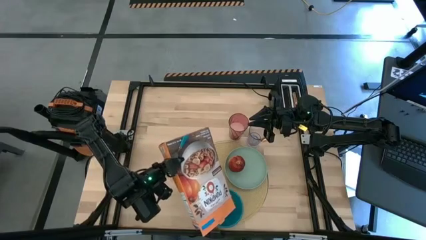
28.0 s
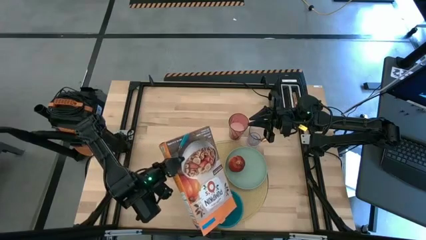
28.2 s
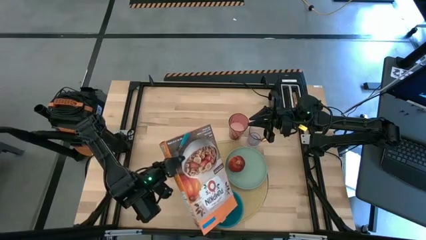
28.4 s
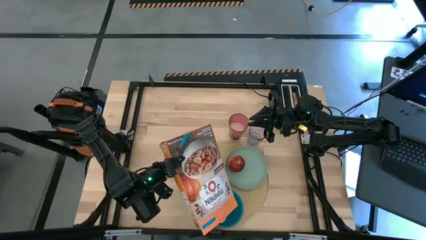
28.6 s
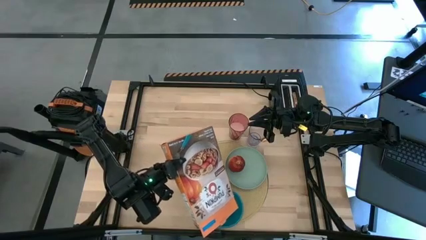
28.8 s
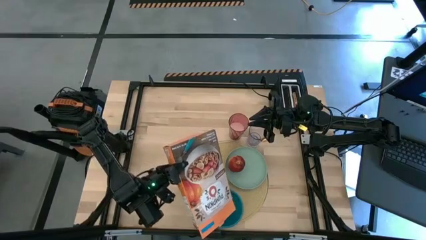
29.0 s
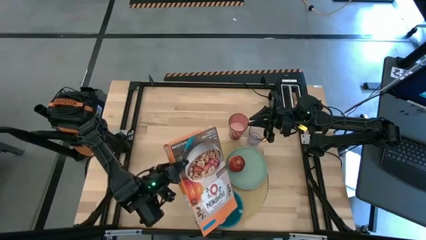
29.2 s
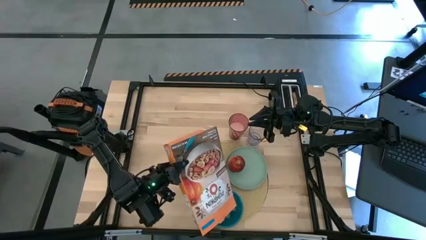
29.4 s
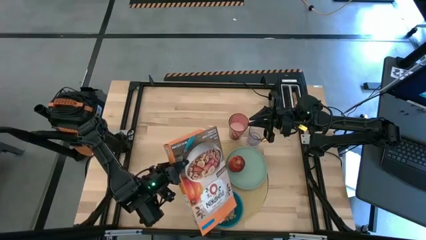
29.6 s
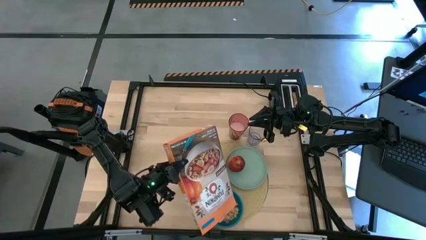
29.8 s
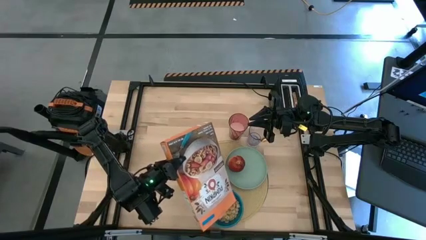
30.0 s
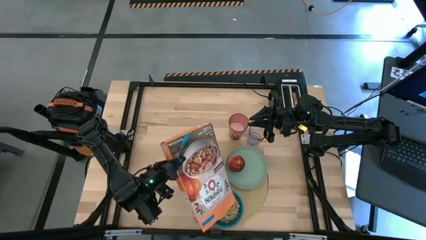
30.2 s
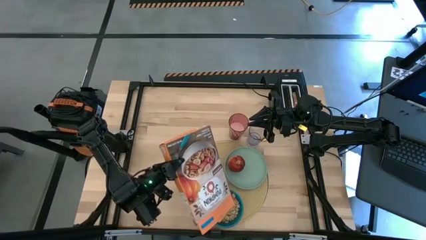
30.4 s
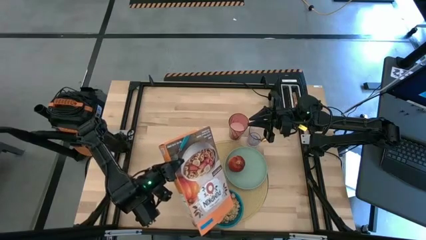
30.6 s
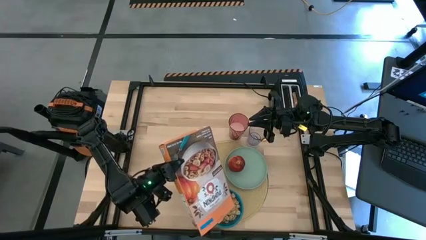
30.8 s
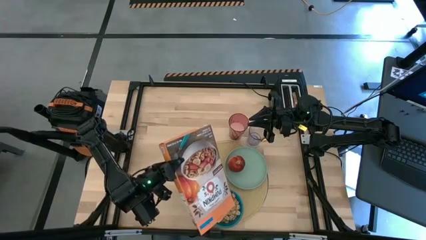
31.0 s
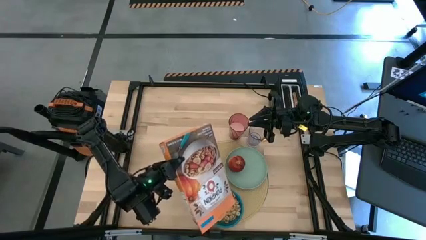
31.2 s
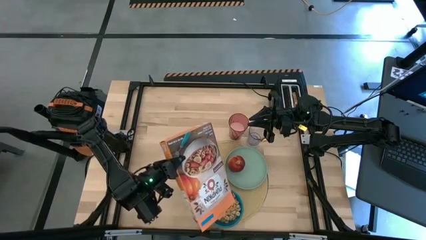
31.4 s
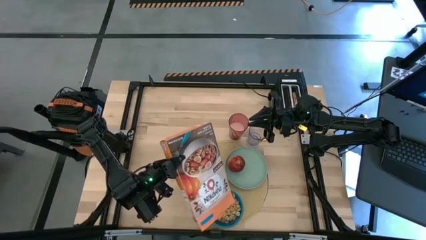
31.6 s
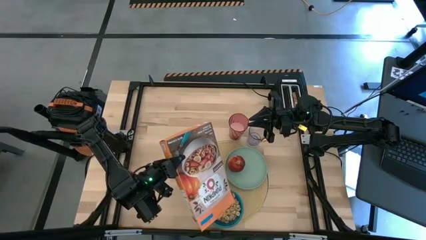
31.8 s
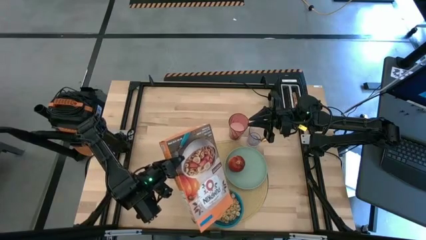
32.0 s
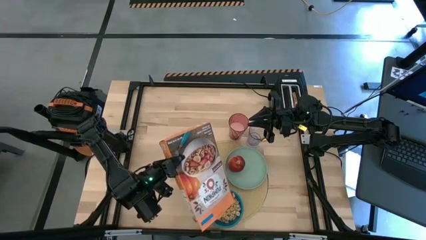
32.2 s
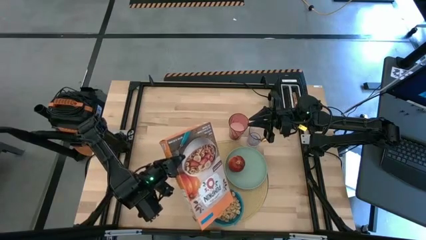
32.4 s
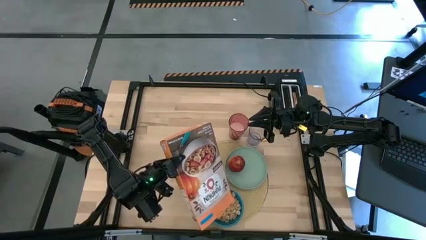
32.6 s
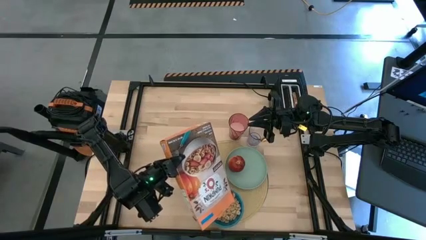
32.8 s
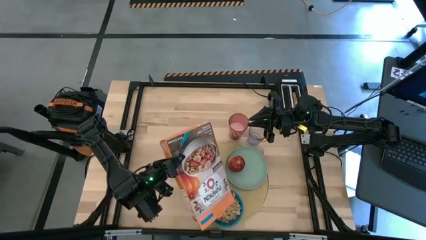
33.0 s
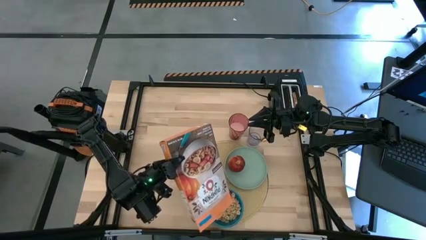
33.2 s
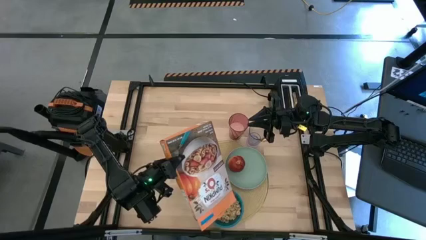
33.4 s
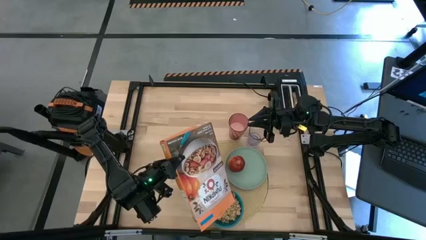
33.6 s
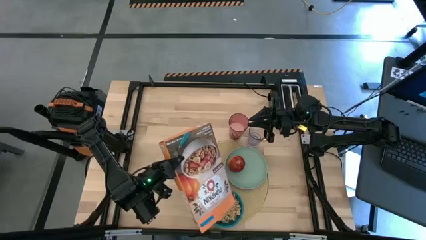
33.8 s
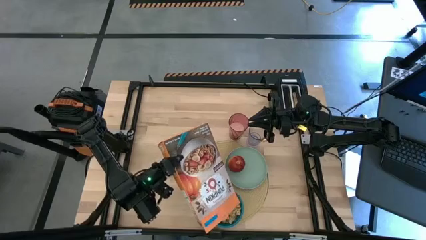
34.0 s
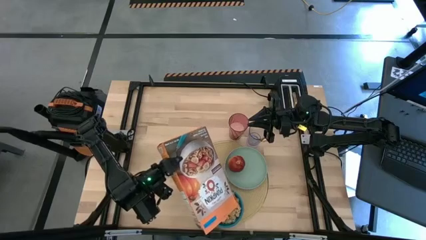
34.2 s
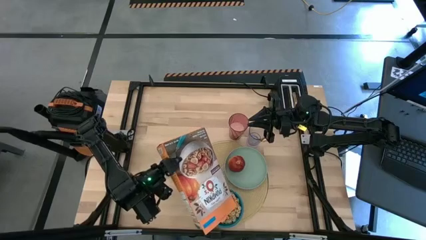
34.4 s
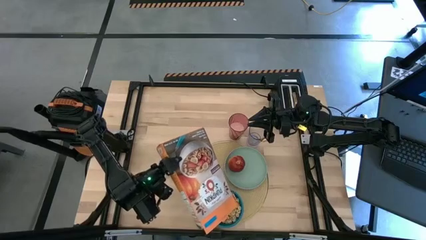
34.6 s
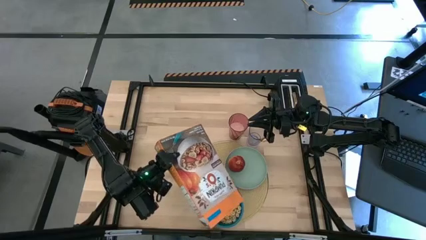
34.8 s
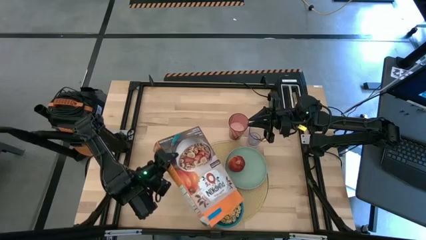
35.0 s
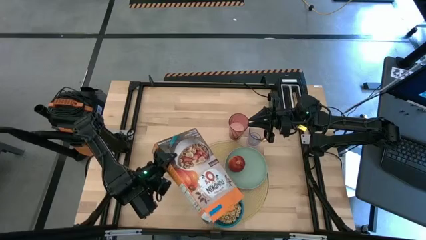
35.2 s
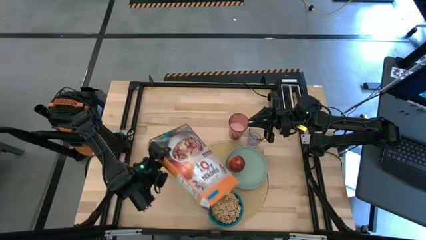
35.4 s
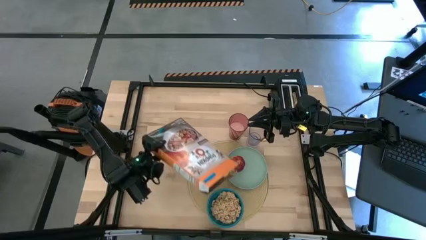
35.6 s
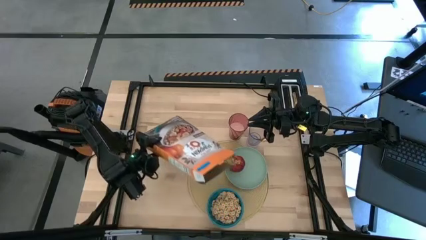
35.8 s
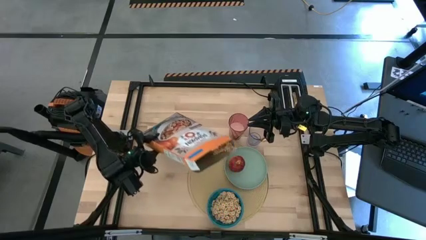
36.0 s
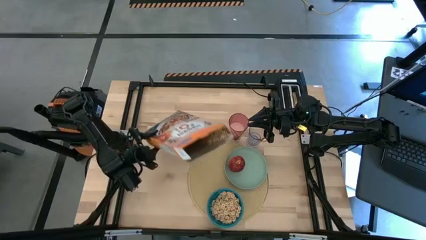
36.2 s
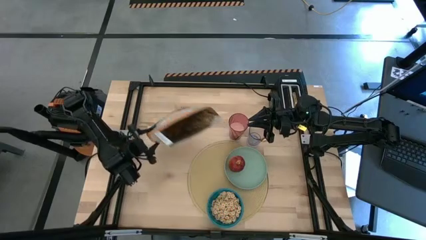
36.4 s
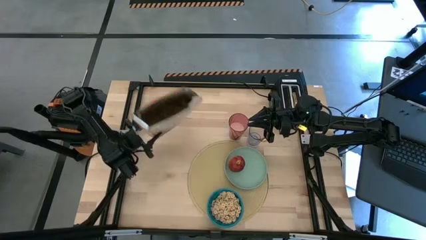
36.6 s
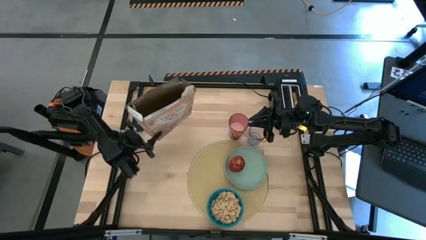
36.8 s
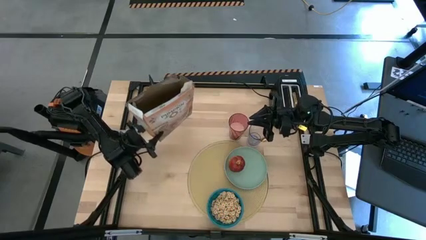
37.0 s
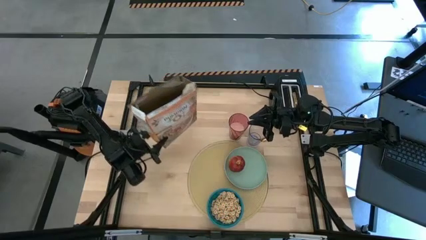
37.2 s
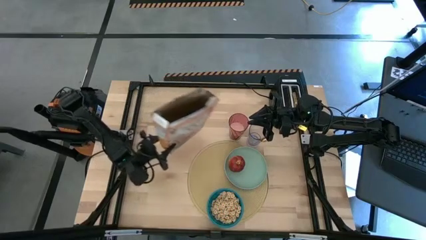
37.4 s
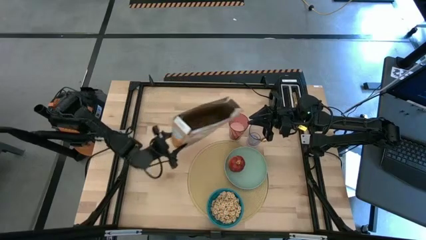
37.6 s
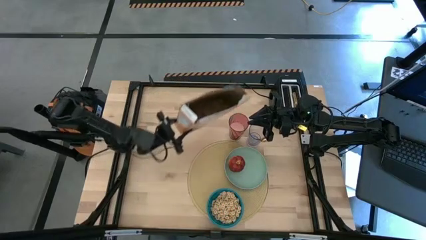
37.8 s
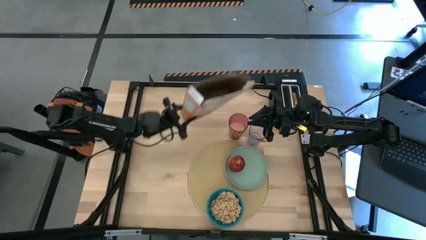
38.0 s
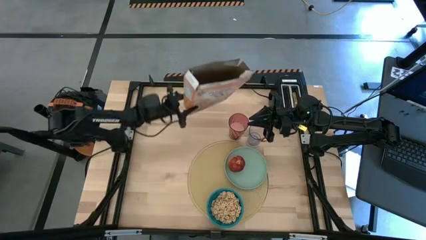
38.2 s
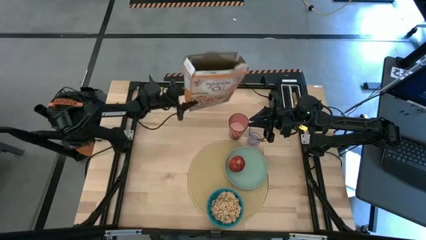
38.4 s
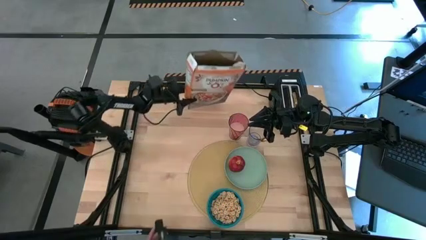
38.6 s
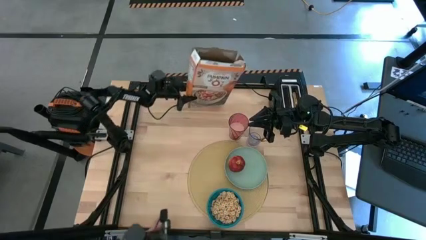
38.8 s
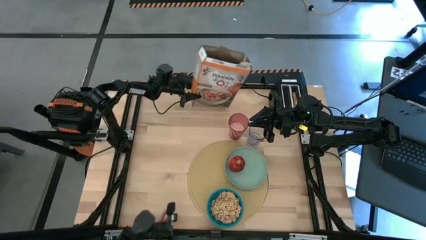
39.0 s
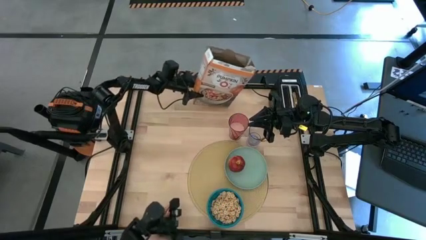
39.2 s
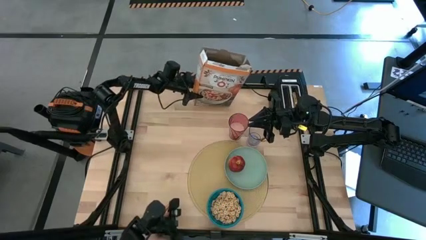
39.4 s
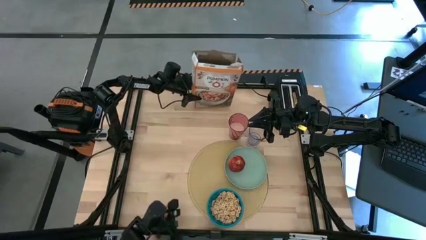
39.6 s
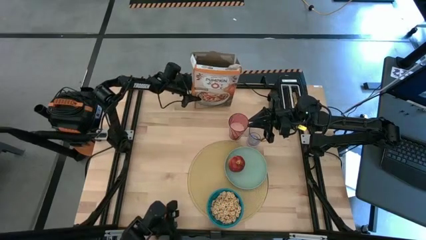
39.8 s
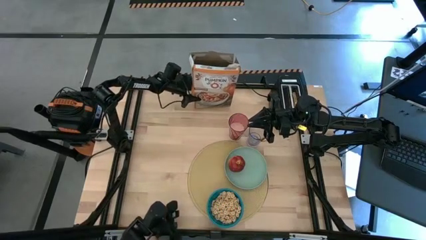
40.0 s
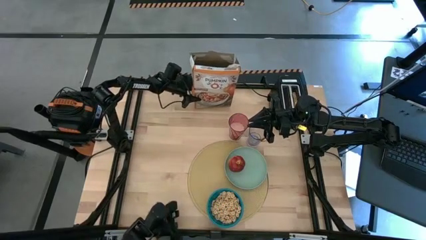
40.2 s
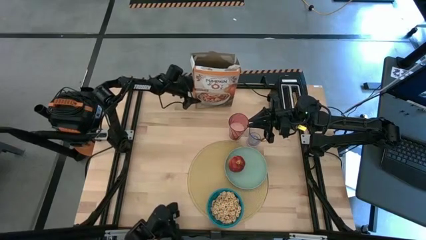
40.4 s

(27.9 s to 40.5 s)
Task: Arrange a breakfast setting
Pour the cereal into the blue bowl

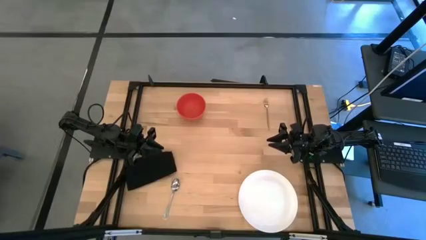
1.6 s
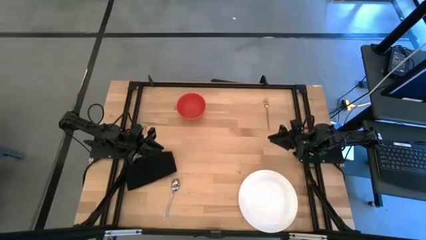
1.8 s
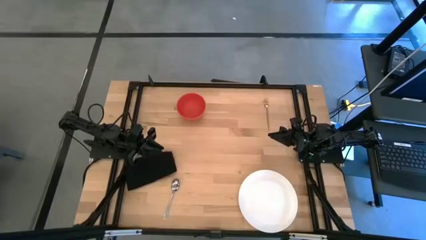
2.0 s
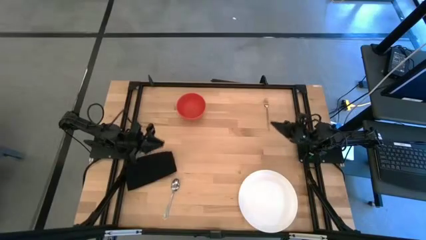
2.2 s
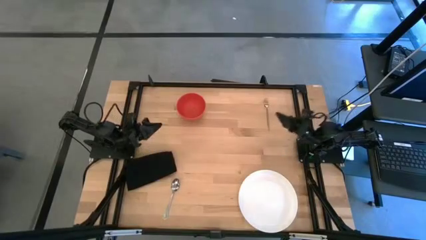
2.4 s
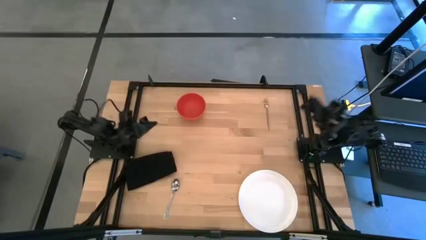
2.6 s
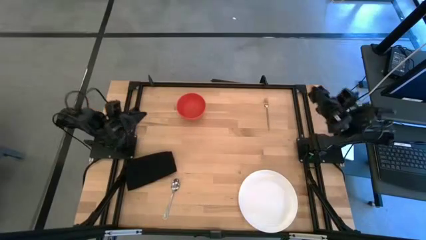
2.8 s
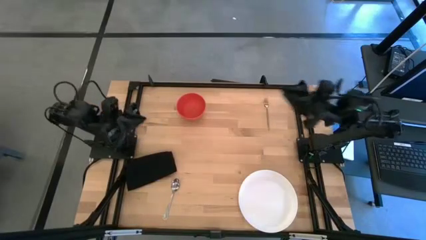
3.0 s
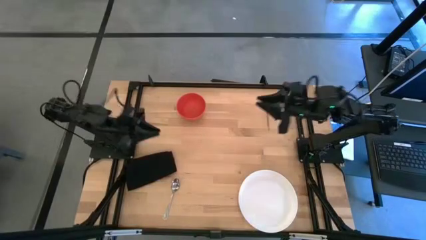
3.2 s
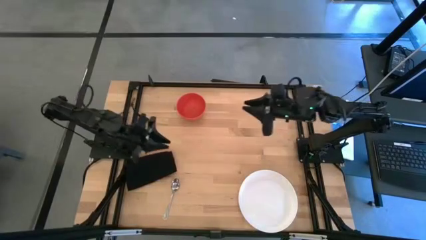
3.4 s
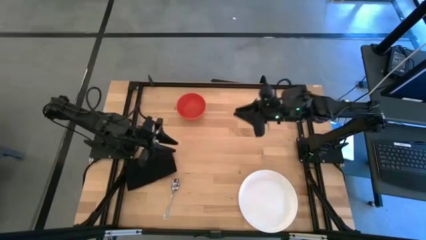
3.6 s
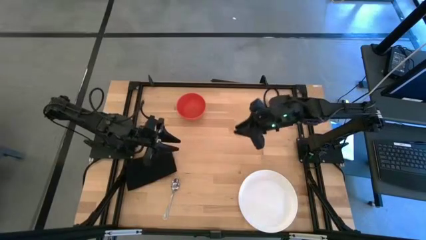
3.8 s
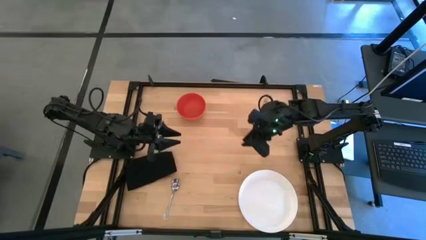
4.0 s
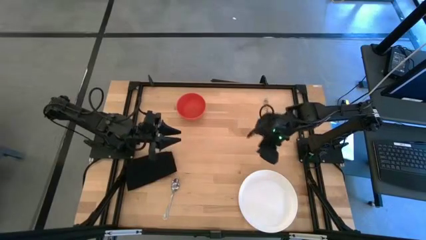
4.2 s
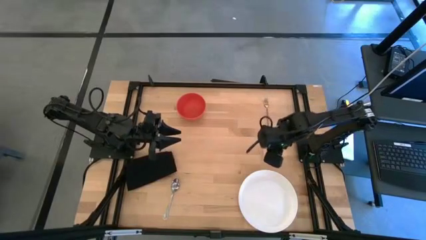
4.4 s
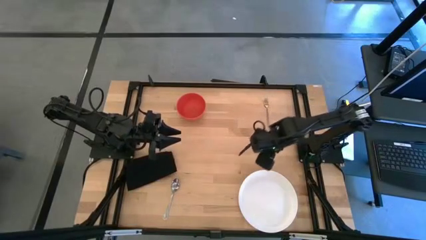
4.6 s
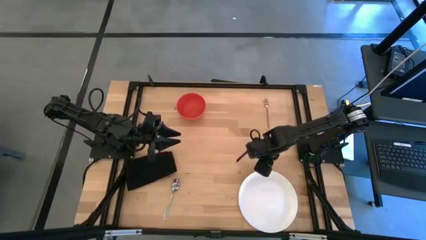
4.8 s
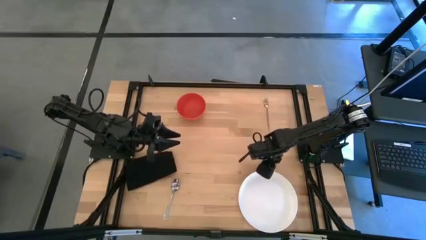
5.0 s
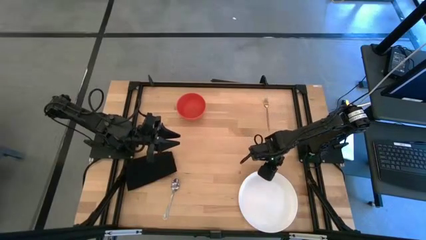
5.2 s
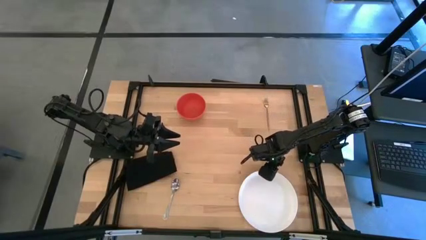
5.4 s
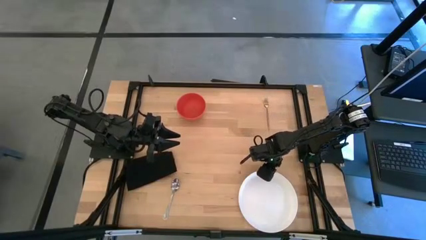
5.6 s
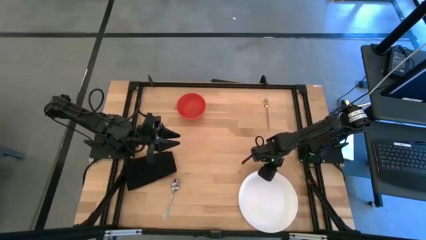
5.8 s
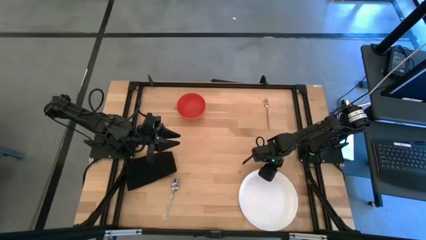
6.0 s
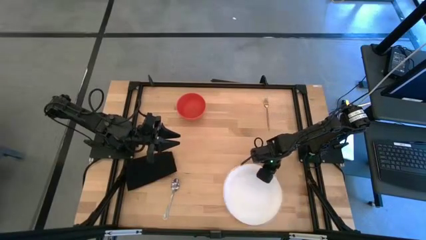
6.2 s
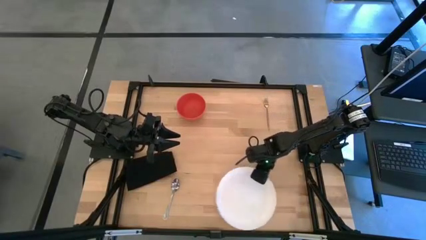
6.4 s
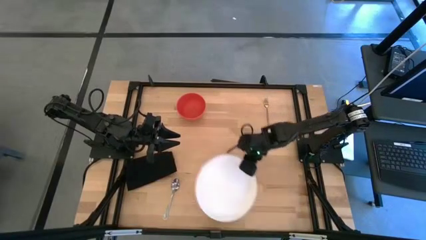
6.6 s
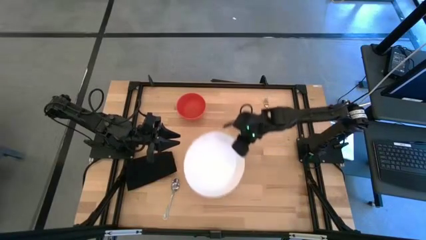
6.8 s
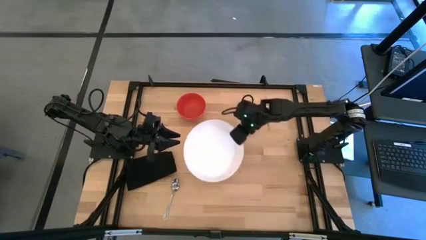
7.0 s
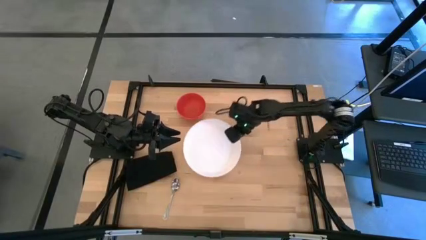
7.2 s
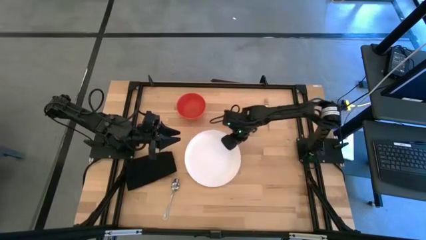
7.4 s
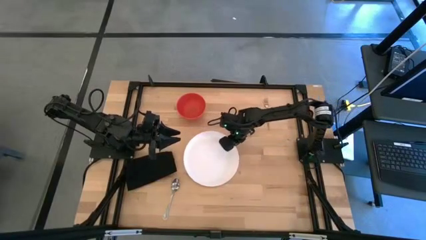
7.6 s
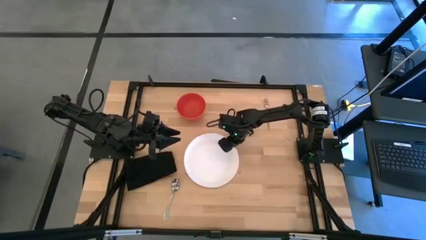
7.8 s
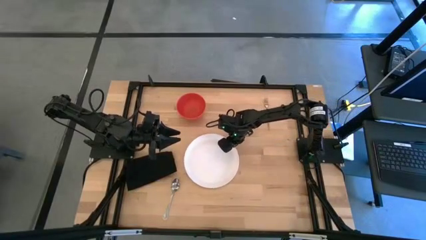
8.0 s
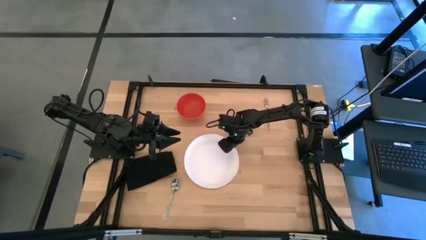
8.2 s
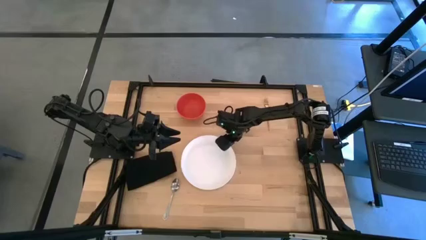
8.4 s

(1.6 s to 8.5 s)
Task: Set table place
Move the white plate to the center of the table
